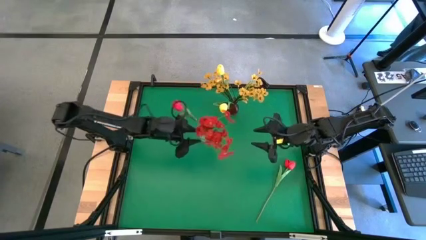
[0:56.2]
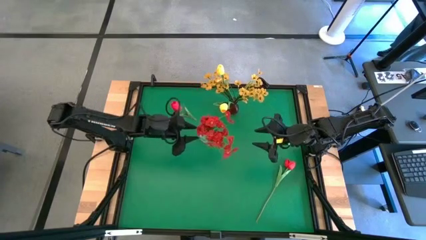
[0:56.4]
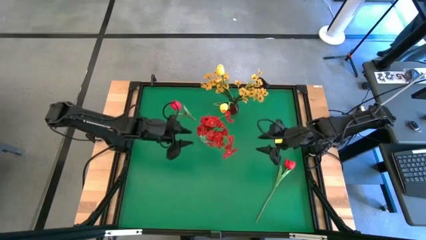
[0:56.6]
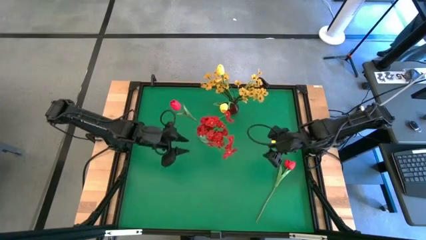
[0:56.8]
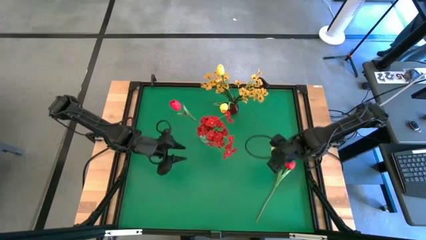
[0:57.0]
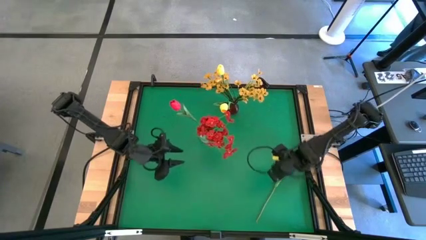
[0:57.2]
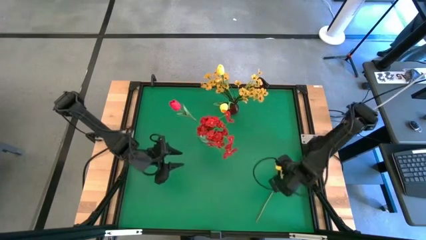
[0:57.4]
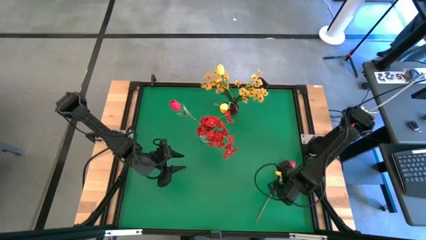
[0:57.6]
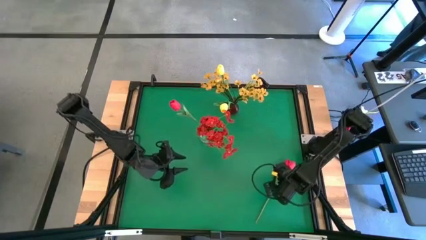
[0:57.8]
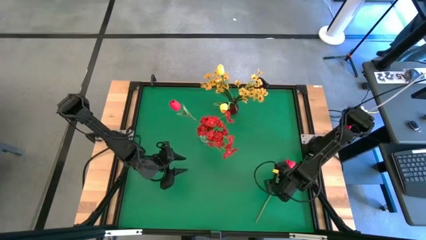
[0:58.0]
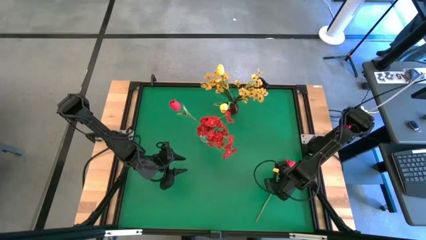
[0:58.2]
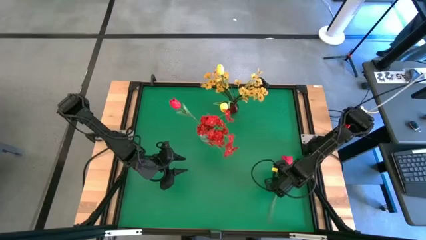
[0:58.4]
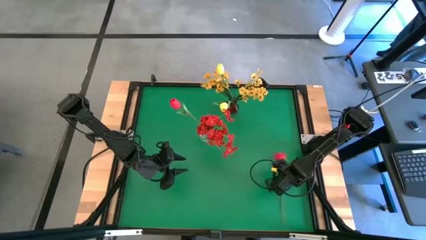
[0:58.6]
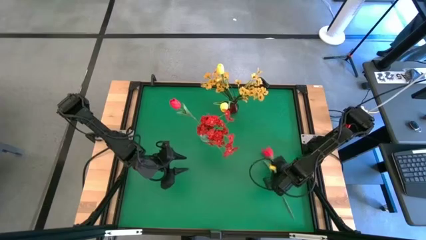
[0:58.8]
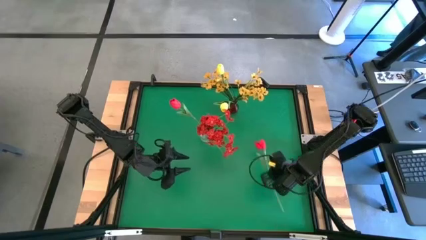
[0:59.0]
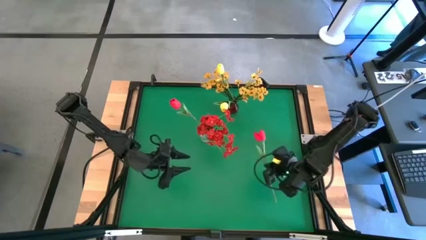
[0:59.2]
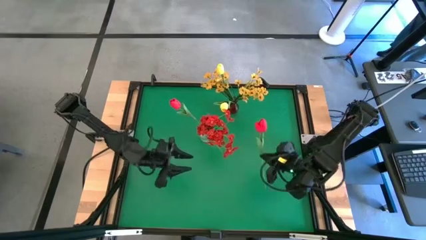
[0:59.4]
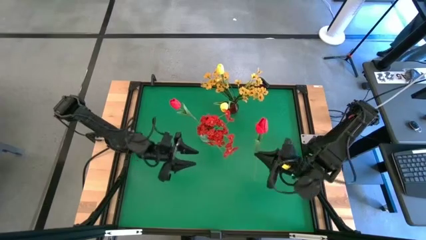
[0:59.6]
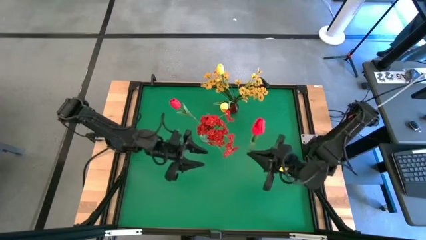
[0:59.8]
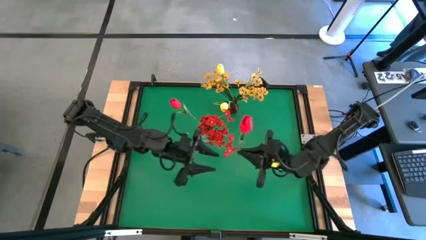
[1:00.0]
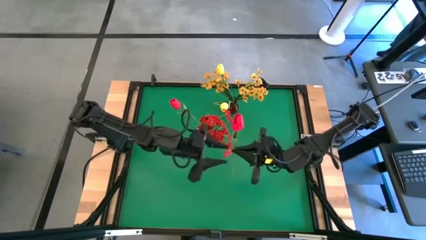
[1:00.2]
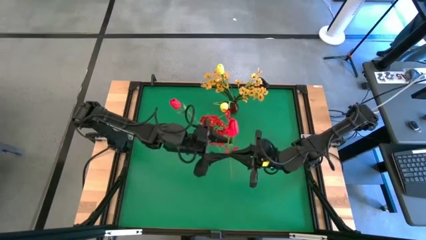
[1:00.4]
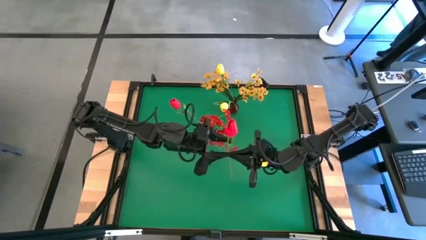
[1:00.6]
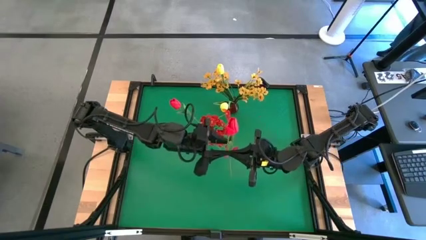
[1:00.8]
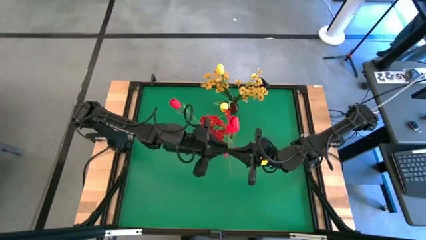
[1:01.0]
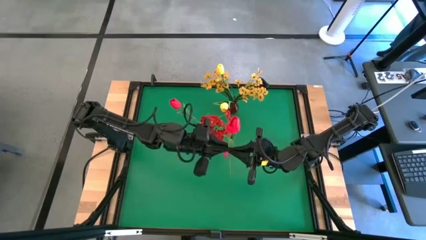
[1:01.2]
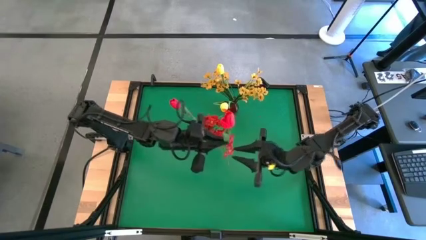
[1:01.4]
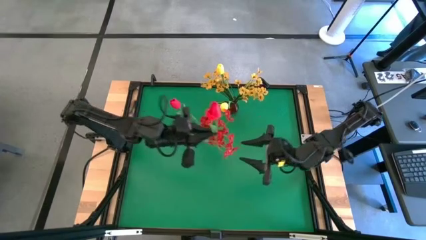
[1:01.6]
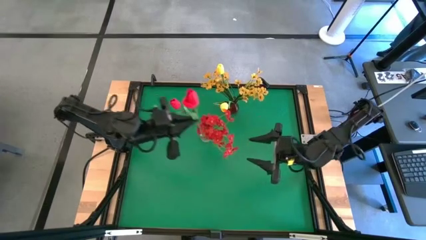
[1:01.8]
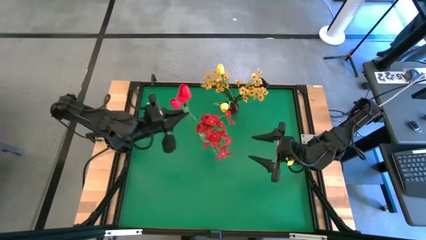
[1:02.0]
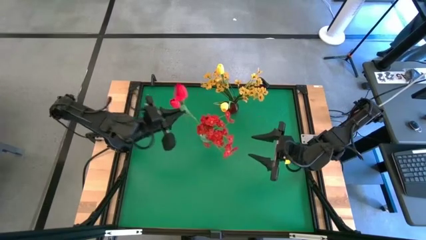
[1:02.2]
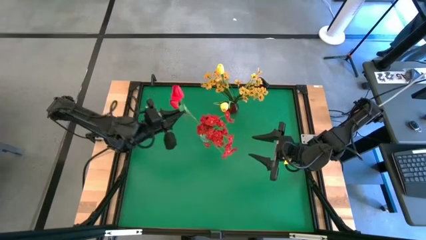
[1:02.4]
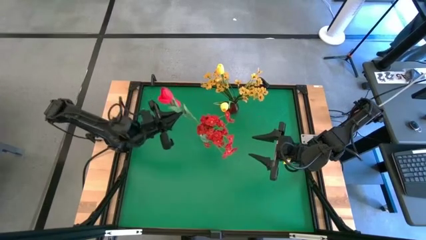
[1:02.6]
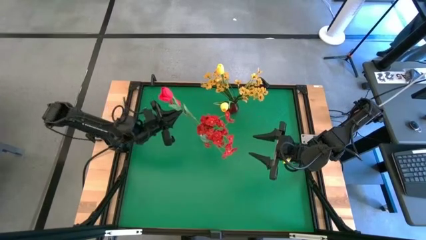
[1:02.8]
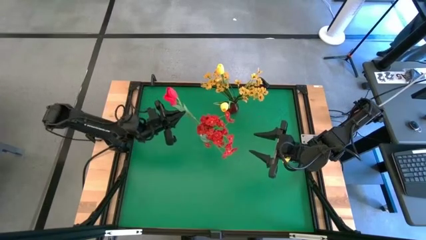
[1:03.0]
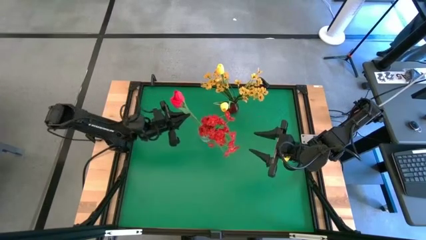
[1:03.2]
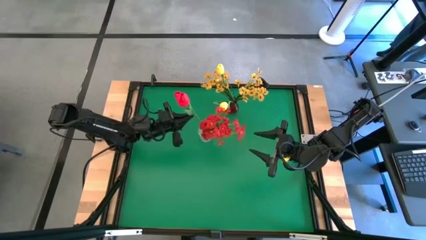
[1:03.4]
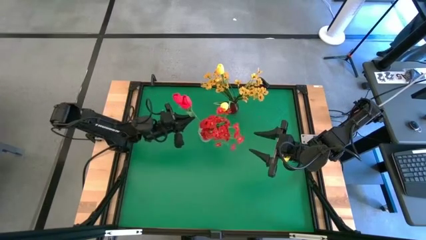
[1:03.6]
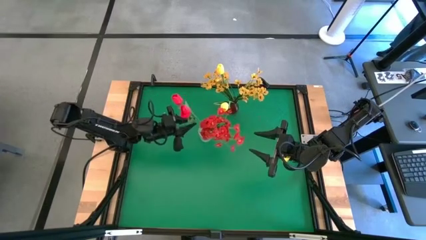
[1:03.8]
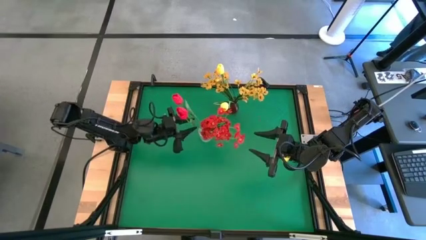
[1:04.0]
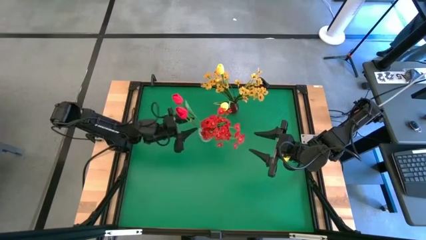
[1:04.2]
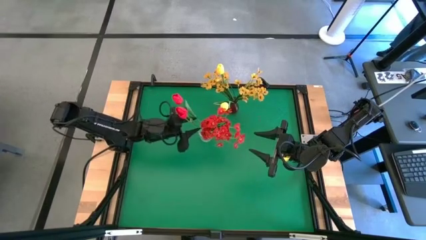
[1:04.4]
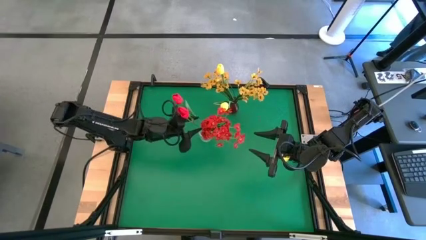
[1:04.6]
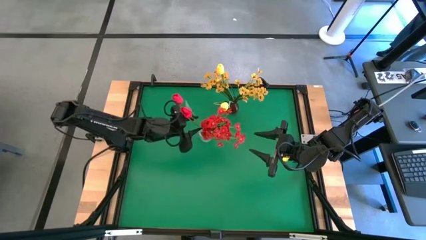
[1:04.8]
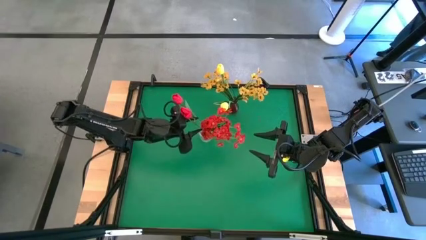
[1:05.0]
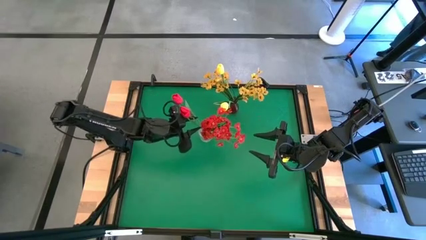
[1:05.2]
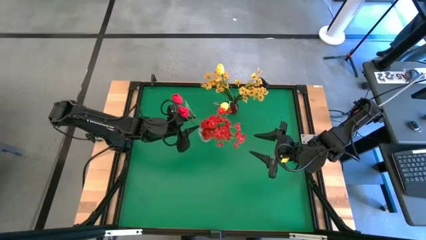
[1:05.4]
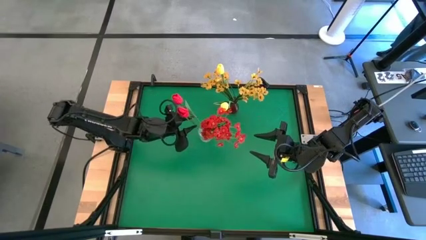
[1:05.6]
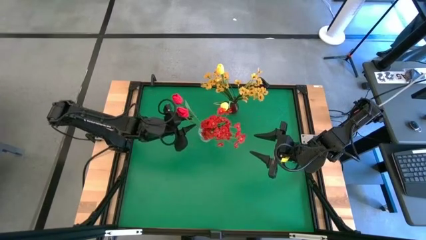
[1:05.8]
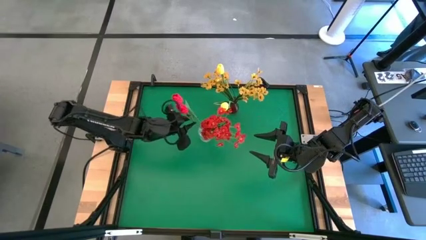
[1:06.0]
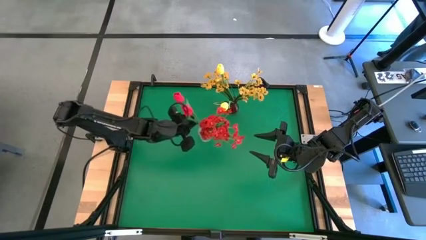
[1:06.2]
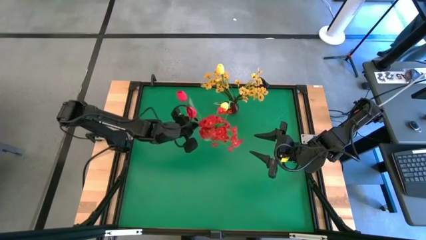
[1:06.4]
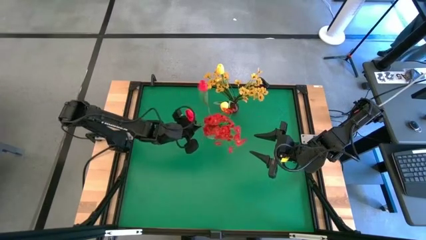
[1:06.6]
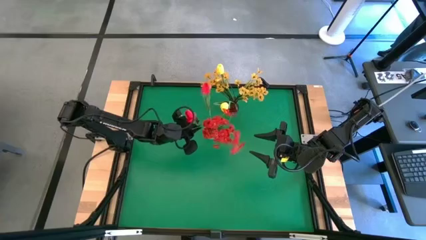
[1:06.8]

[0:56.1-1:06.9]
Task: Sort flowers into vase by color
Put the red tulip into the transparent vase

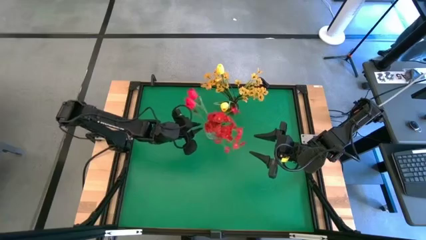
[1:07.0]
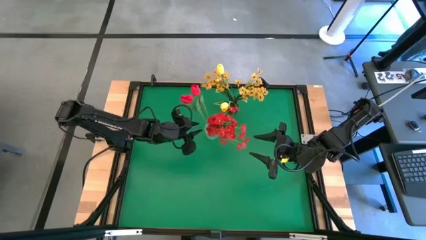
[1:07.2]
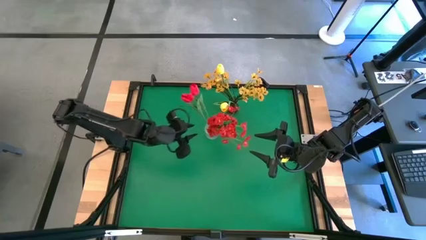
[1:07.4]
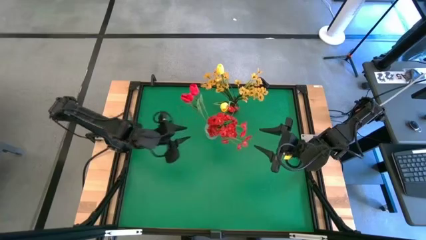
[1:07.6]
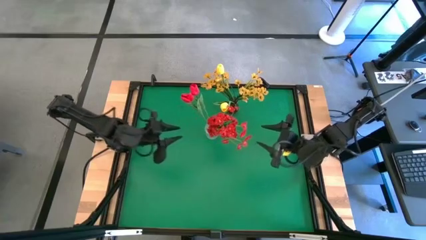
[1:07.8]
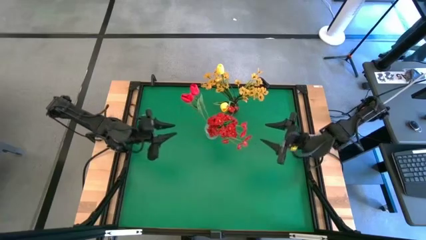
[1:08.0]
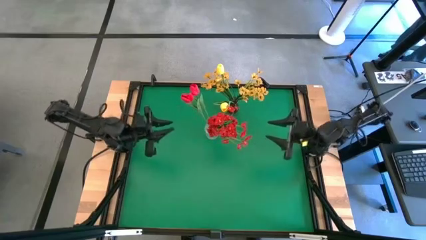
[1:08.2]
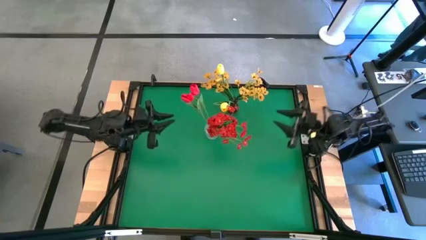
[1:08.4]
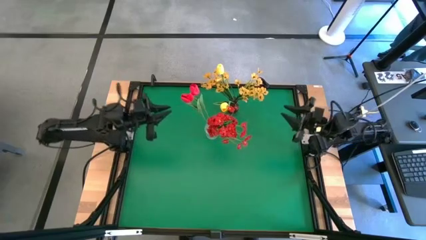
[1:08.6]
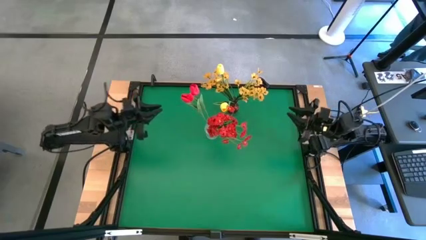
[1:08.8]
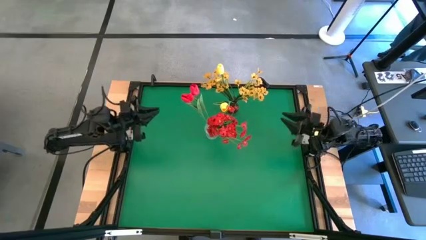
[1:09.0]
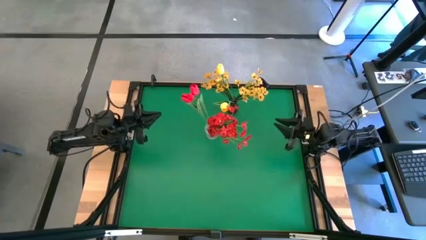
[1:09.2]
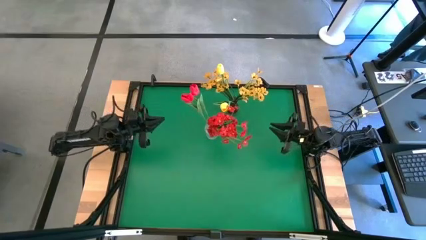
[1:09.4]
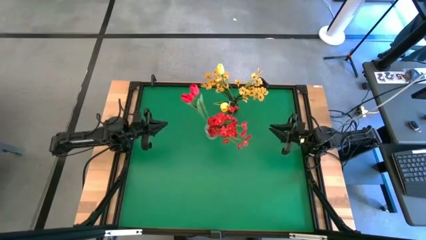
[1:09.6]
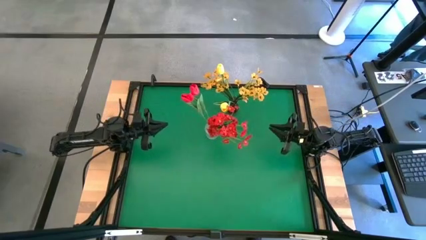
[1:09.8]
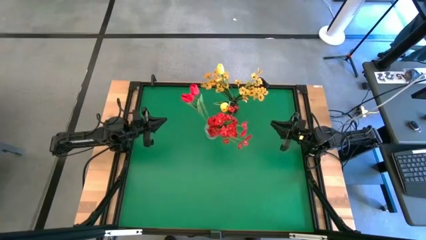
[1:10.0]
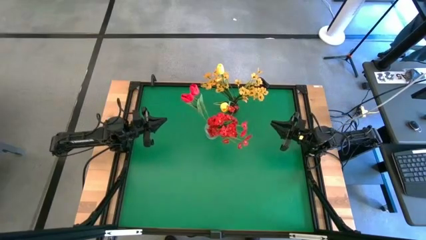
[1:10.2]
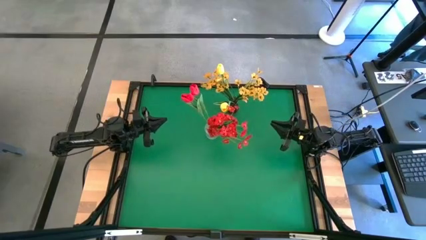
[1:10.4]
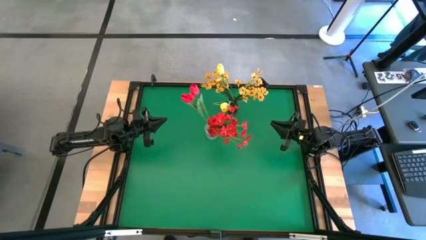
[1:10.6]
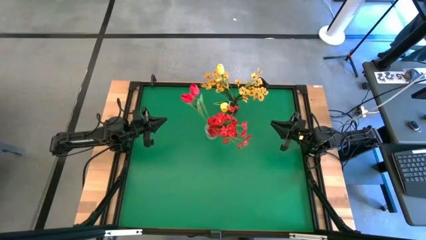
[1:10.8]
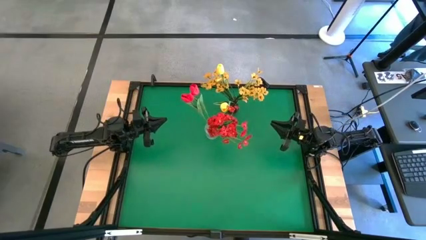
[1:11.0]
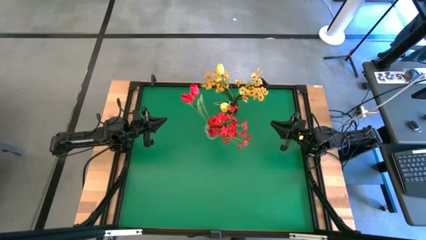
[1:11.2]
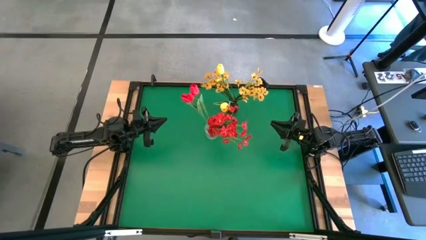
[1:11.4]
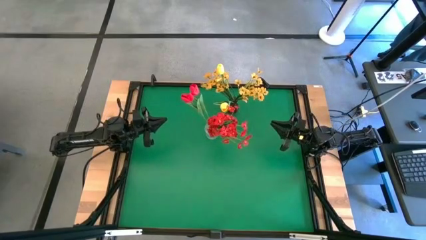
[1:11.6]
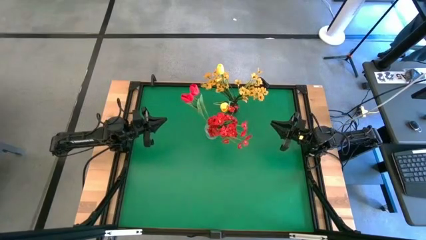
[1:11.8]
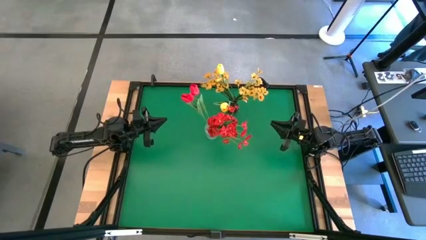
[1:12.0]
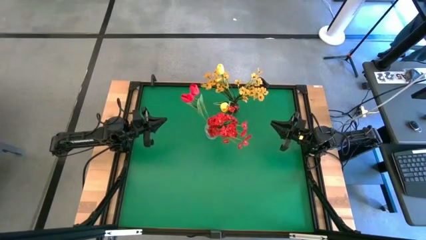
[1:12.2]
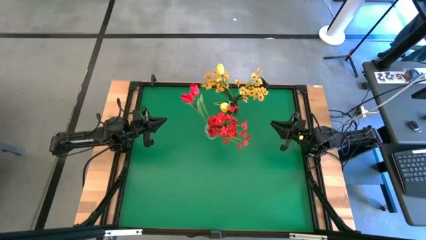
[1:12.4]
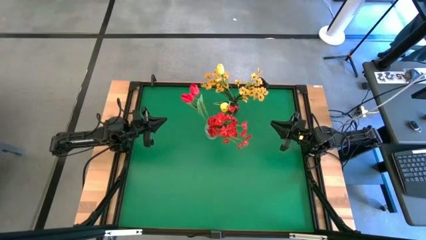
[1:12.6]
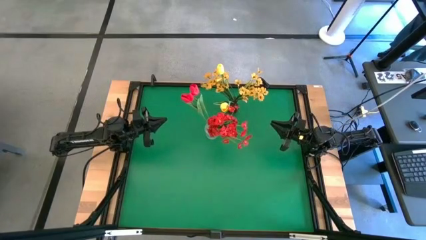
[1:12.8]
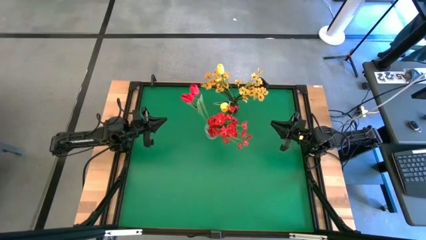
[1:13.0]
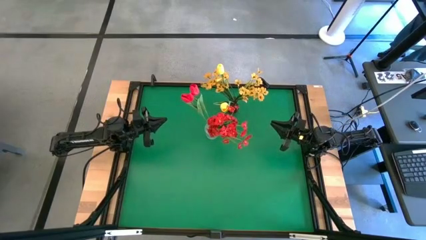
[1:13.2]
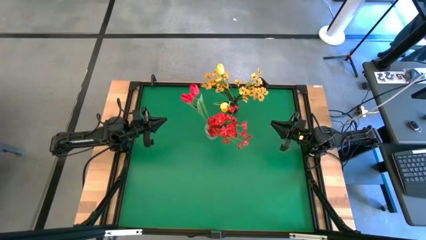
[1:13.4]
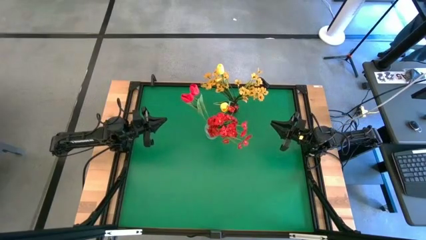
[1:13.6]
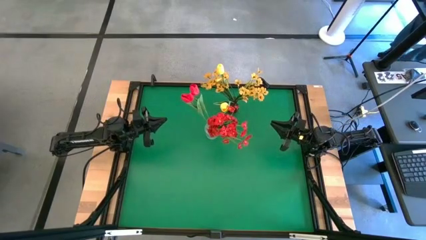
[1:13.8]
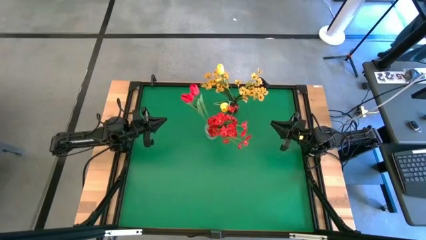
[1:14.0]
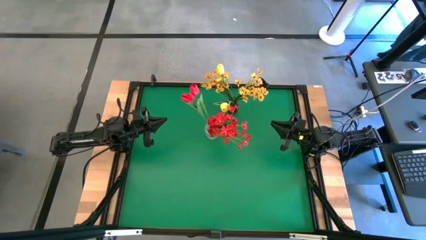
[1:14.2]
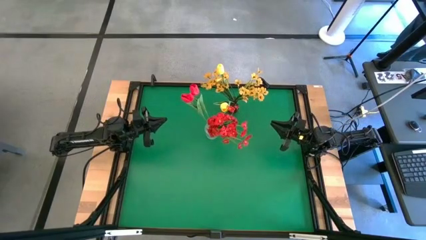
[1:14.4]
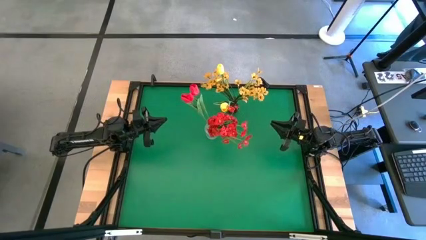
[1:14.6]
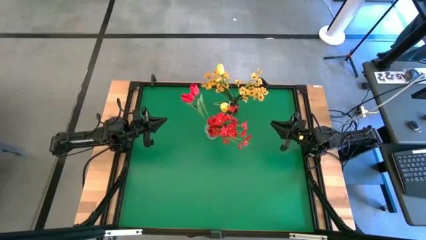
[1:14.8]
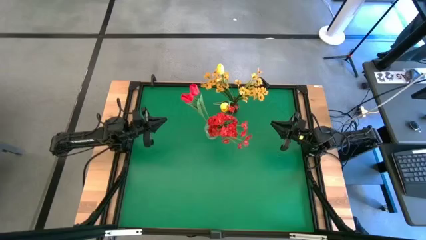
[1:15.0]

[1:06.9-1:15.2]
Return to Home Position
